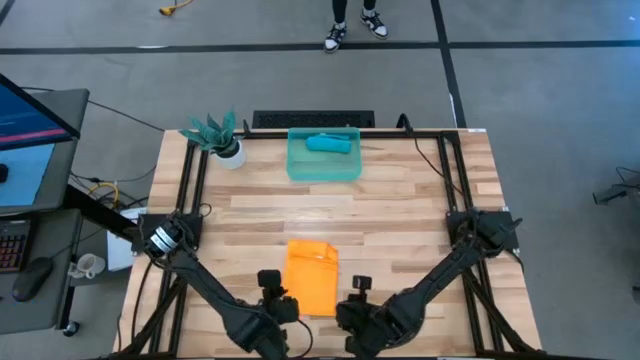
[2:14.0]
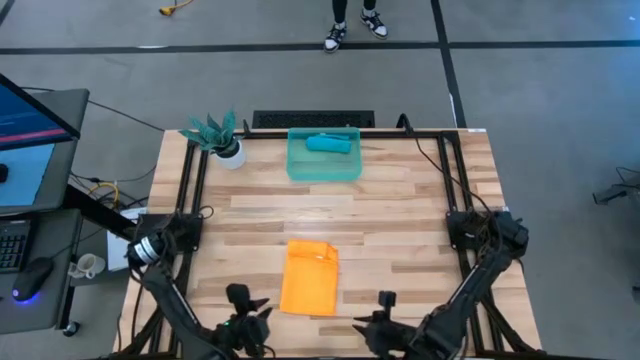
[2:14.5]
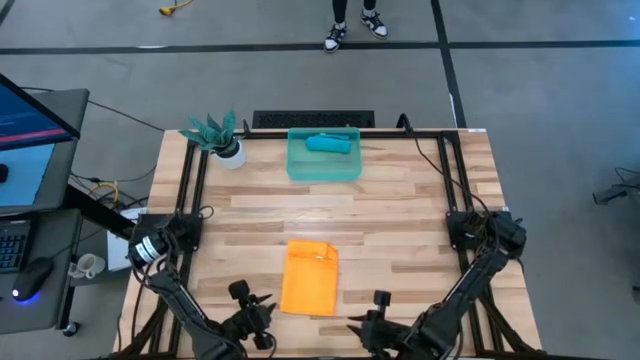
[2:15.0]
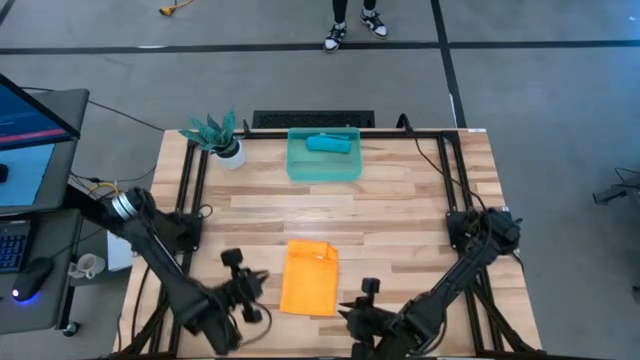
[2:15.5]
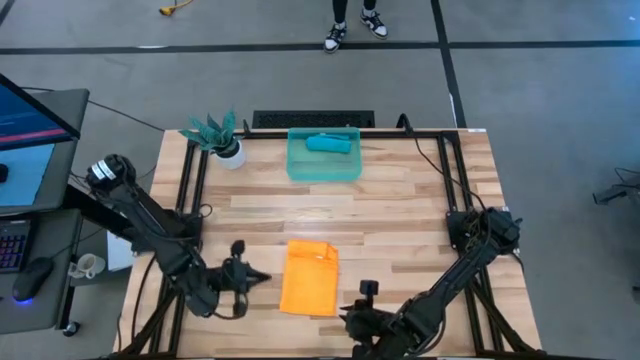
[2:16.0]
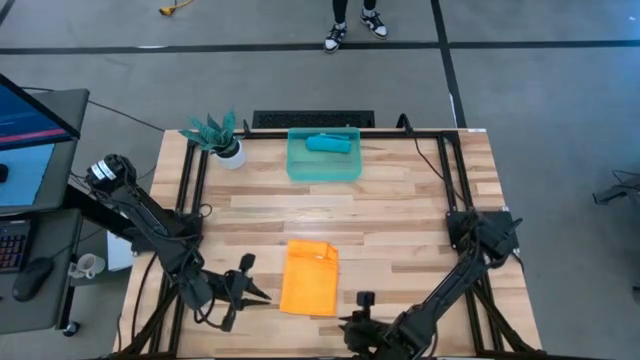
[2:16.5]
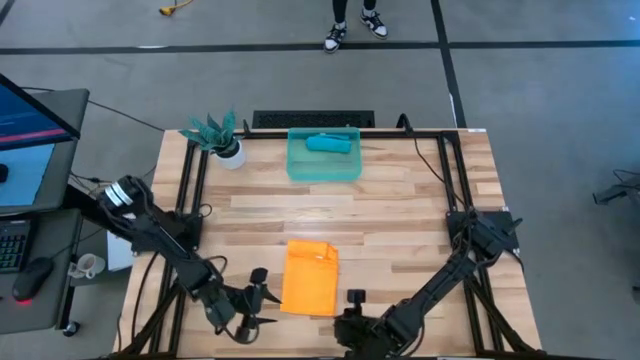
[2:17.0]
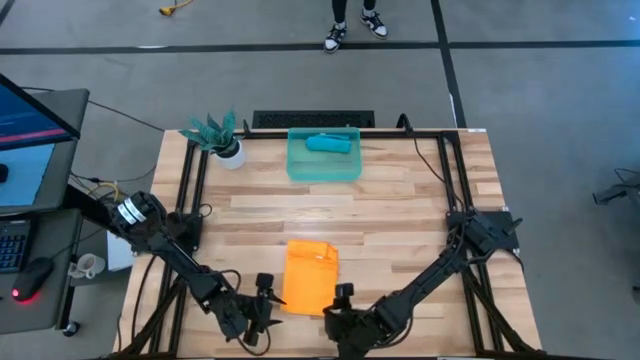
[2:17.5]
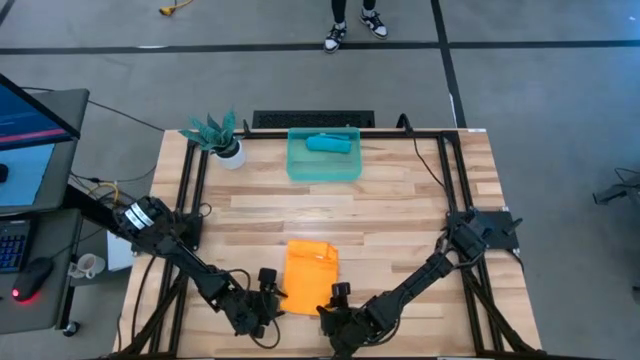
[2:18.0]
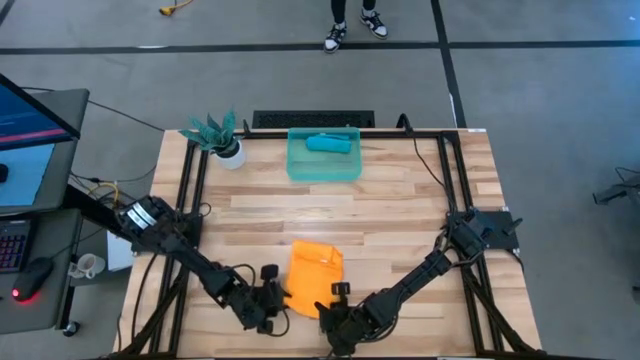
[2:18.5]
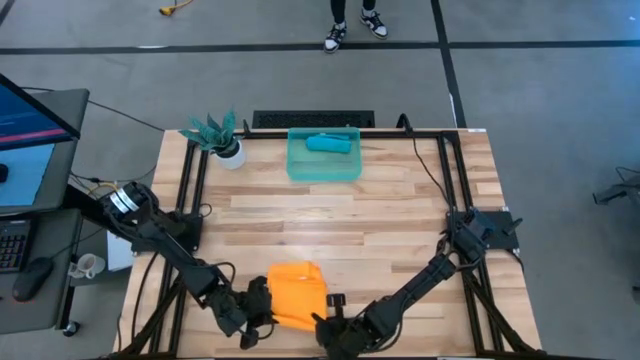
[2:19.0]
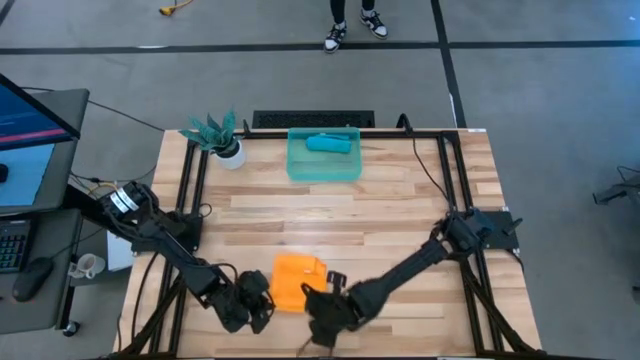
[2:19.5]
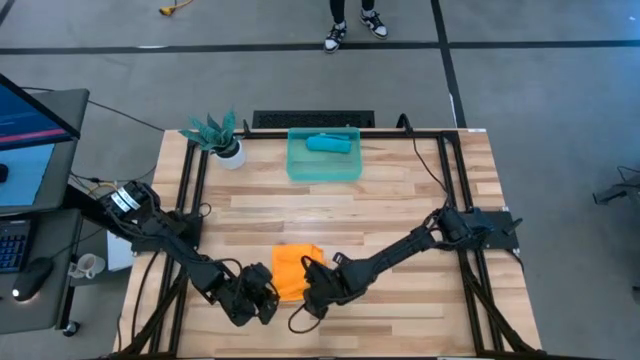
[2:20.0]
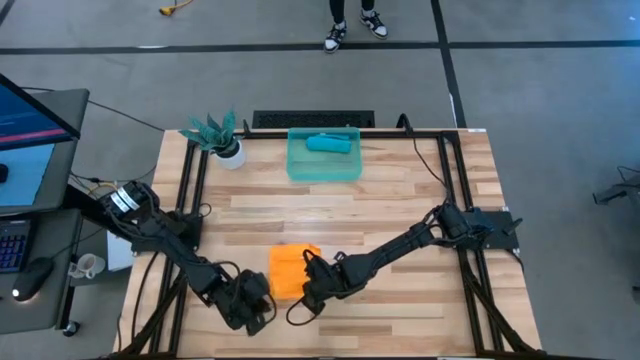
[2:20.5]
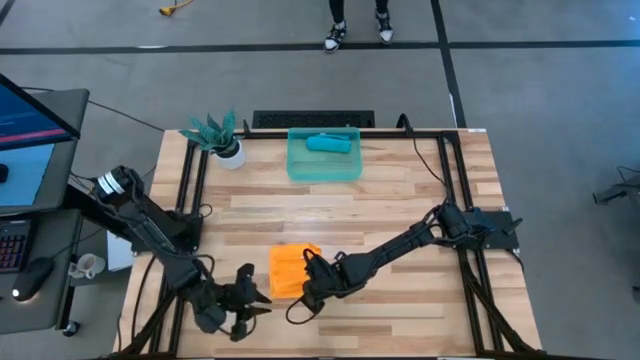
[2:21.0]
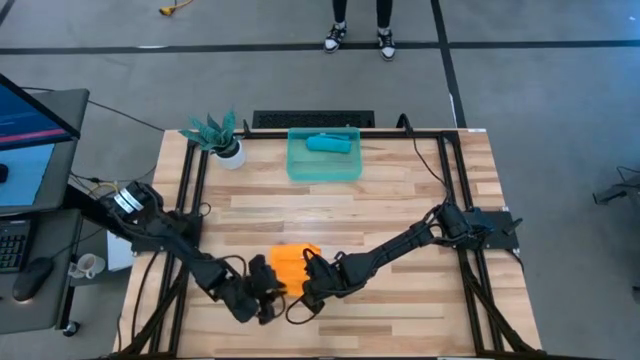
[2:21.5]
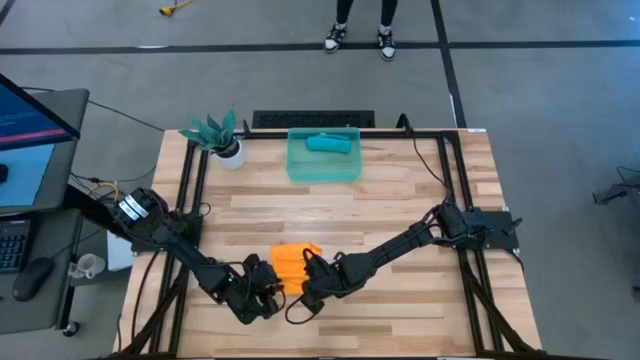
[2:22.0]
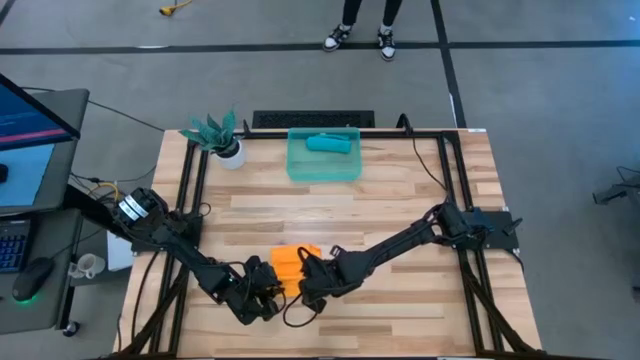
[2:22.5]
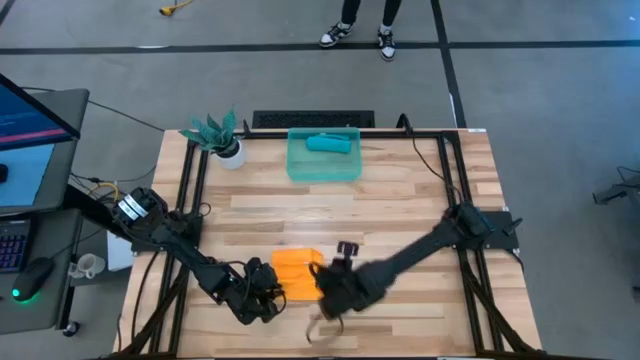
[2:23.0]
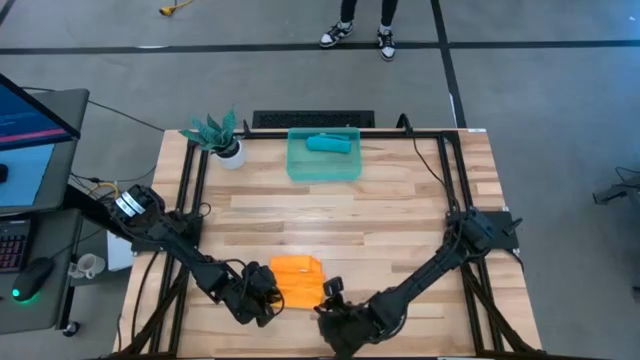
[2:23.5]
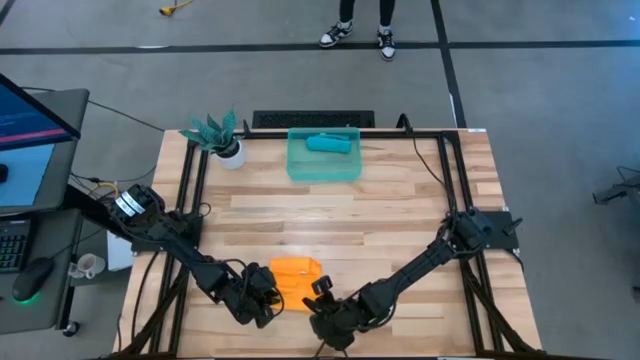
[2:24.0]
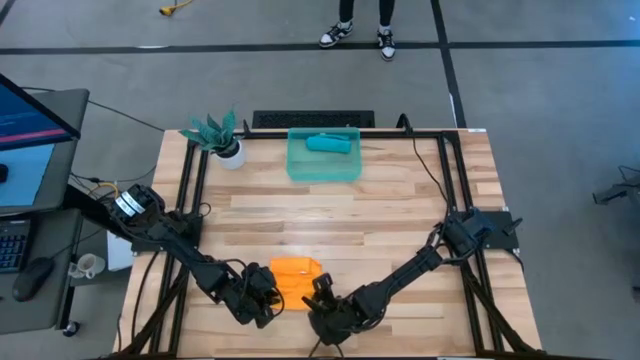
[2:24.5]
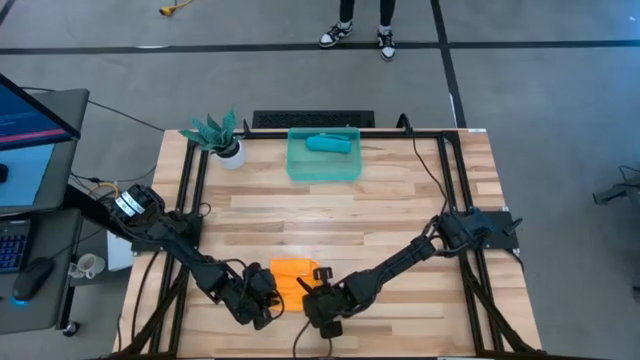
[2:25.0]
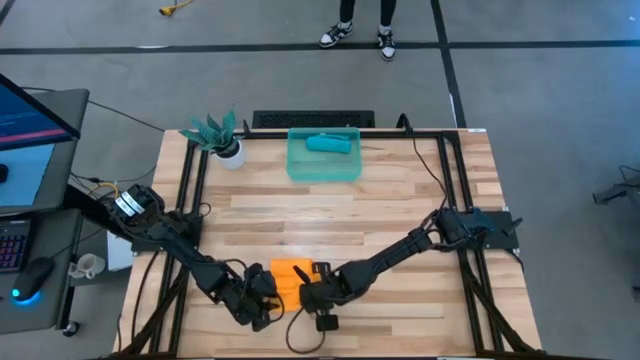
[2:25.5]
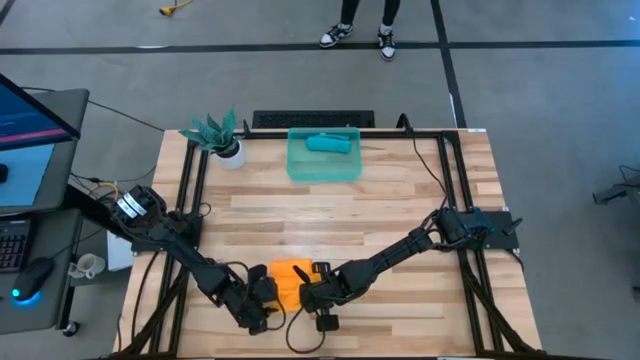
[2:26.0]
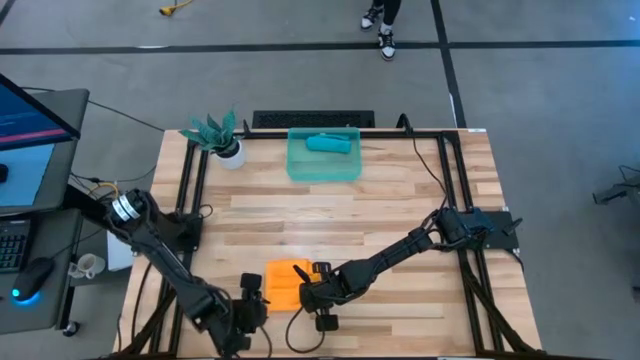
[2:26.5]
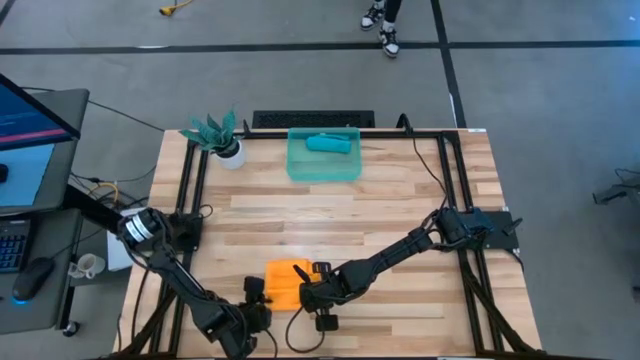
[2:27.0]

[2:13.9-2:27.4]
Task: Roll microfiber towels into tight, uniform cylinder then place into a basket
Roll the yellow microfiber cloth

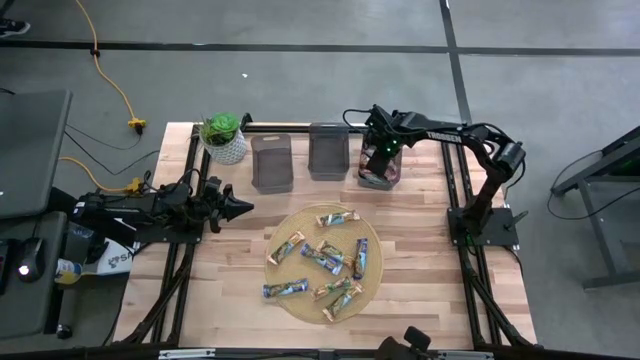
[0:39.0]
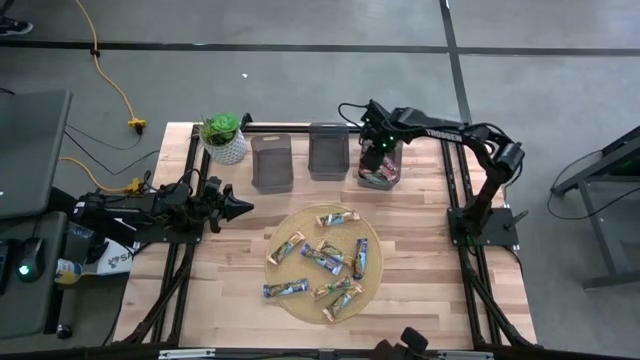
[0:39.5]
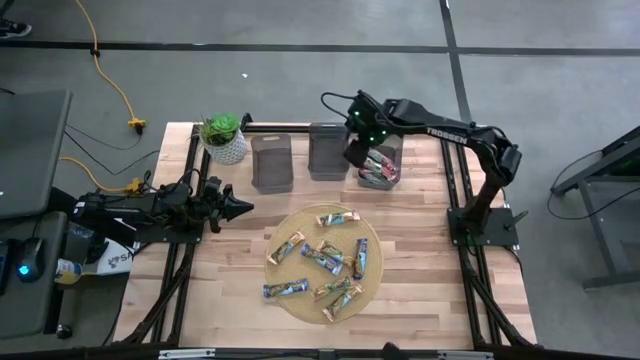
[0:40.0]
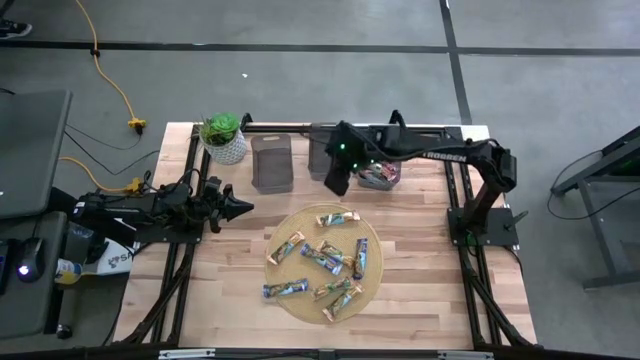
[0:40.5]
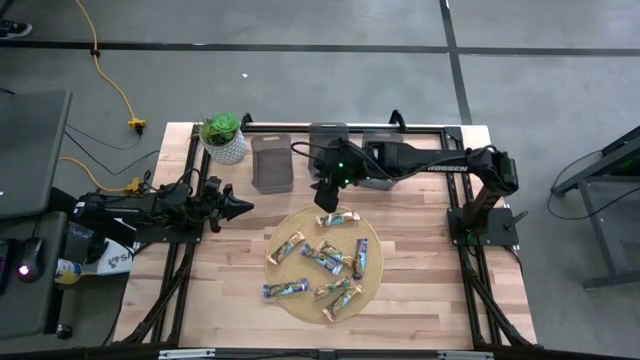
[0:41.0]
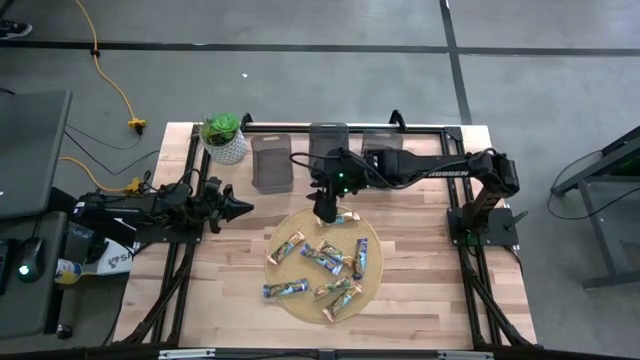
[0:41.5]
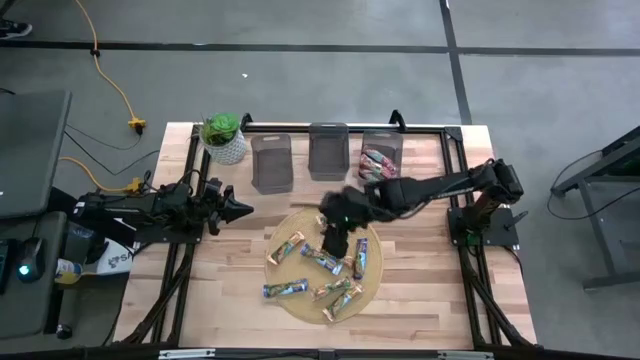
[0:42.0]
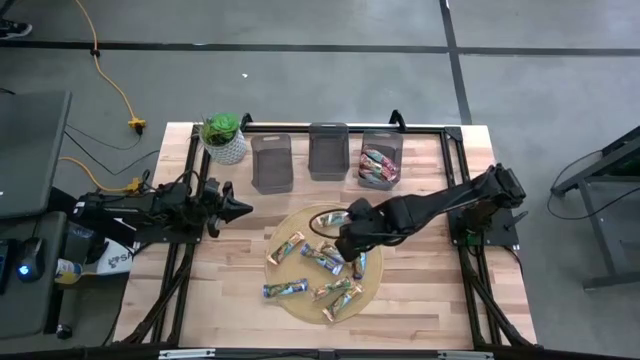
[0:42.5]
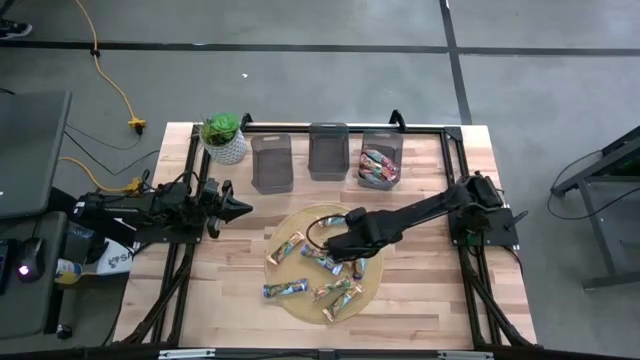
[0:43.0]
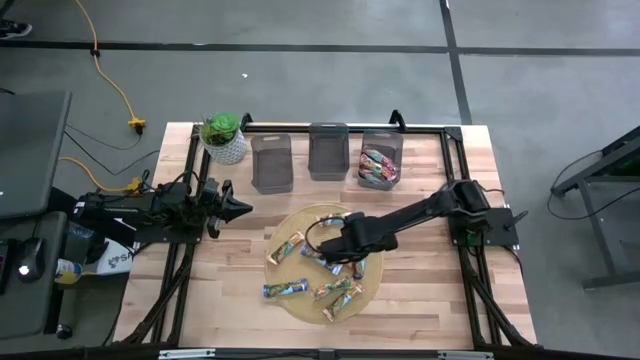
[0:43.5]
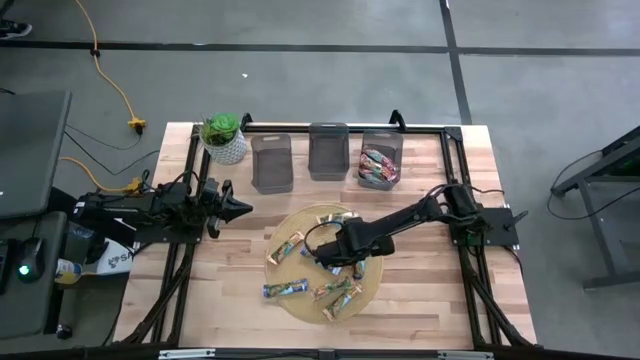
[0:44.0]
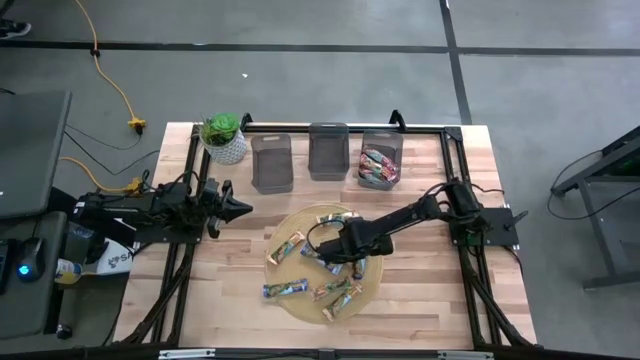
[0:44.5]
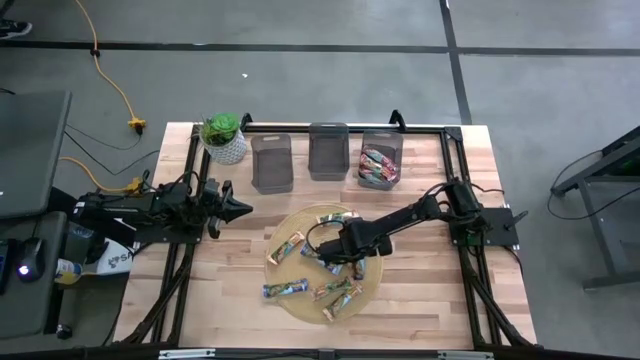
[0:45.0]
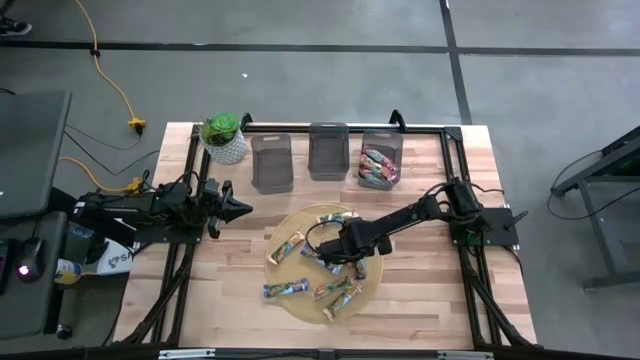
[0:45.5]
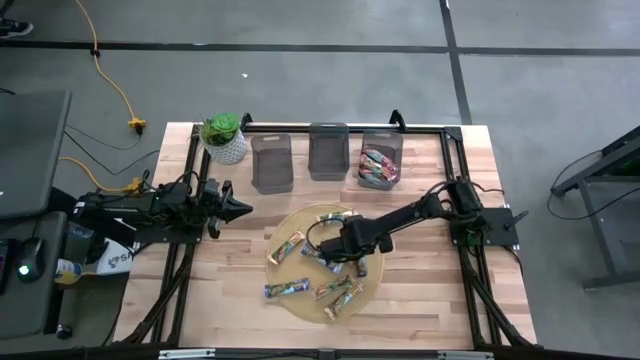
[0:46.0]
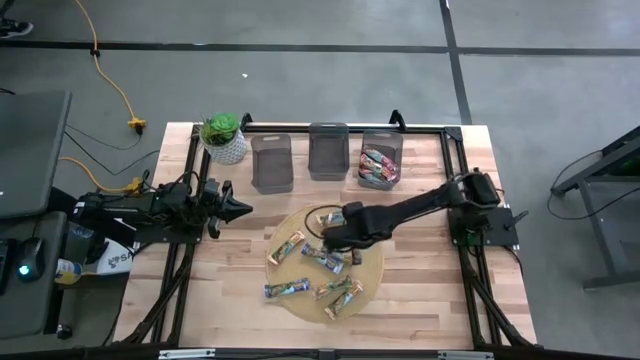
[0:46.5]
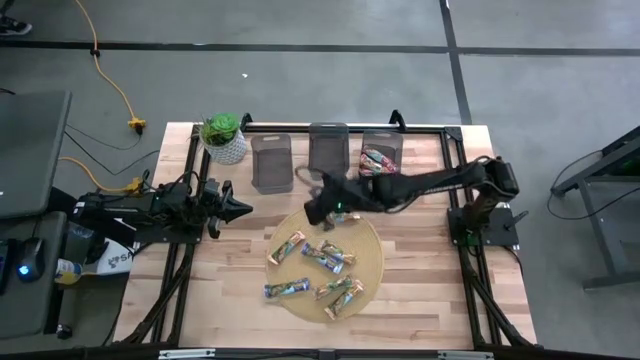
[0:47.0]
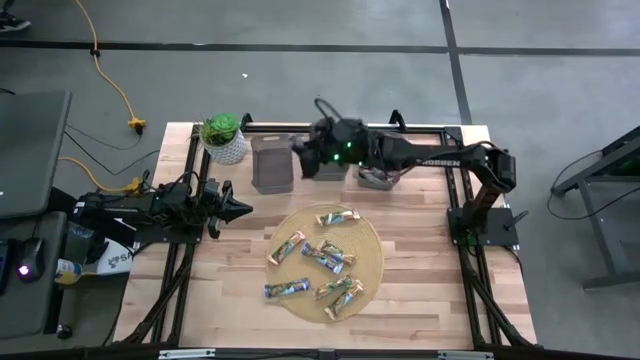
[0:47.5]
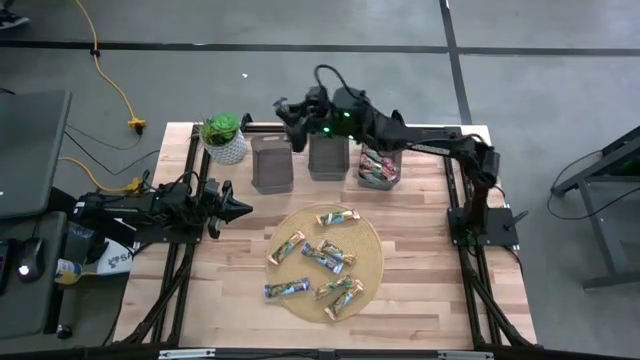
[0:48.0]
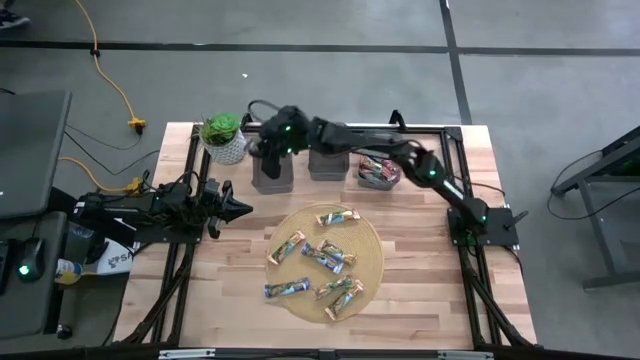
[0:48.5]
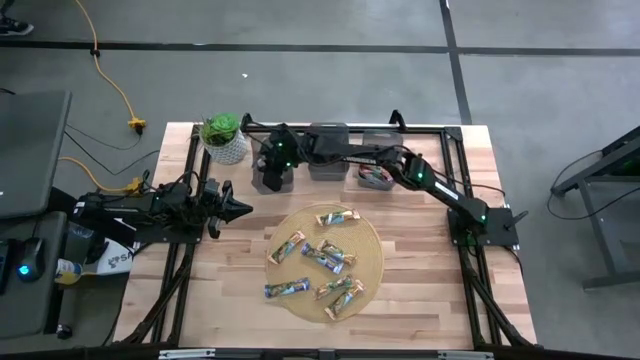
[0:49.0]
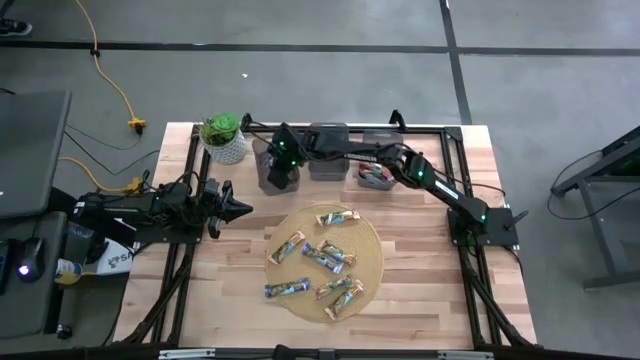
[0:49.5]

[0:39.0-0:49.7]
Task: Pick and place Granola Bars by type
Put the blue granola bar into the left black bin
